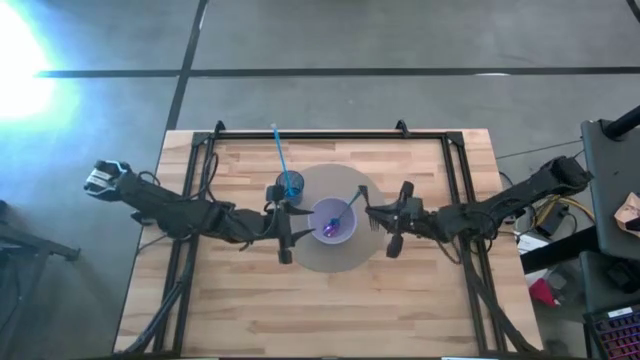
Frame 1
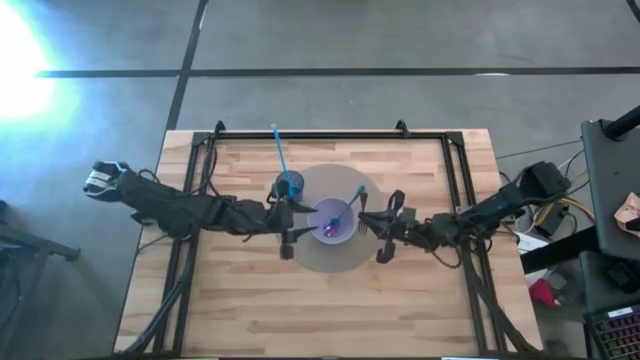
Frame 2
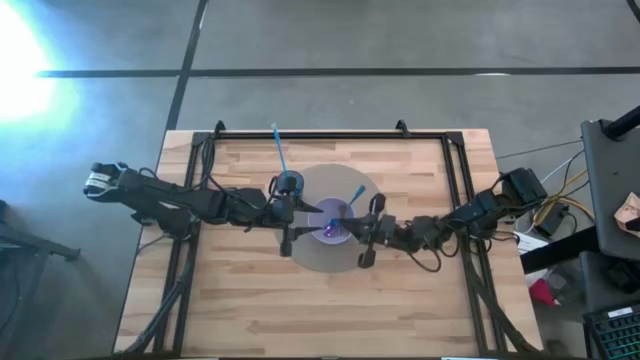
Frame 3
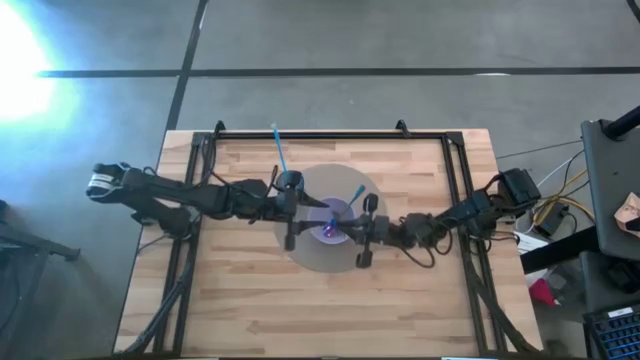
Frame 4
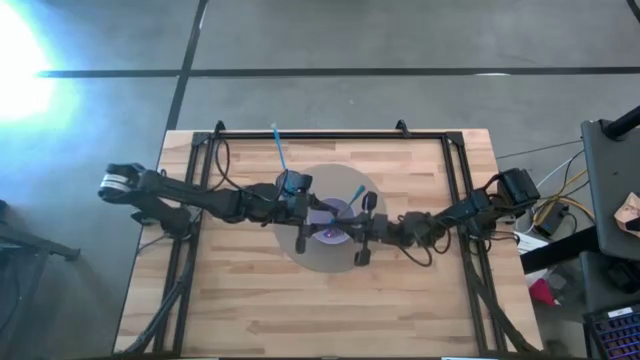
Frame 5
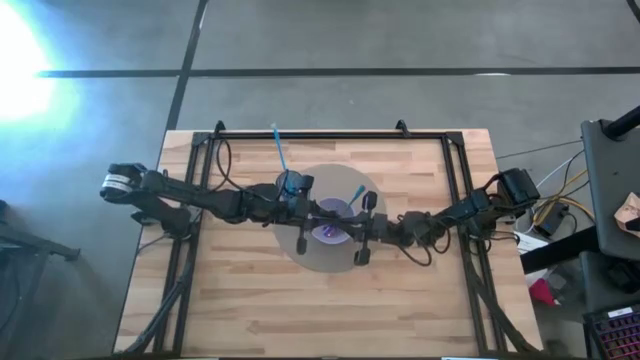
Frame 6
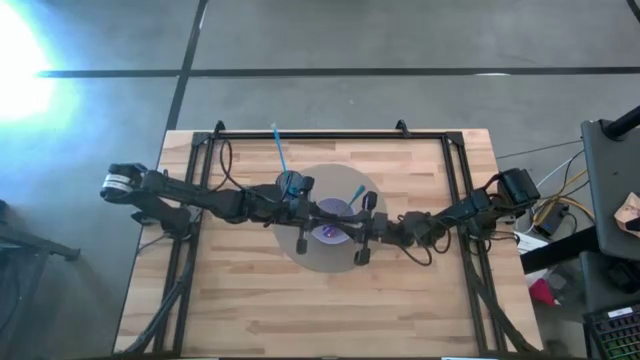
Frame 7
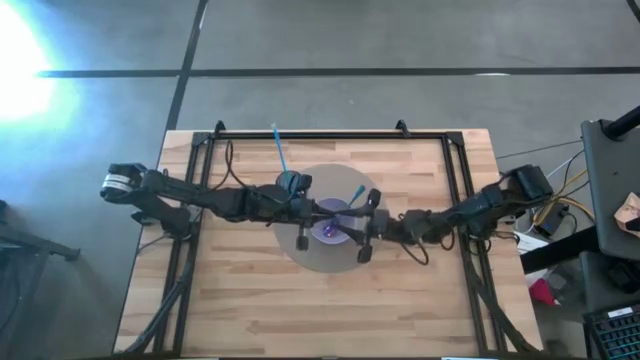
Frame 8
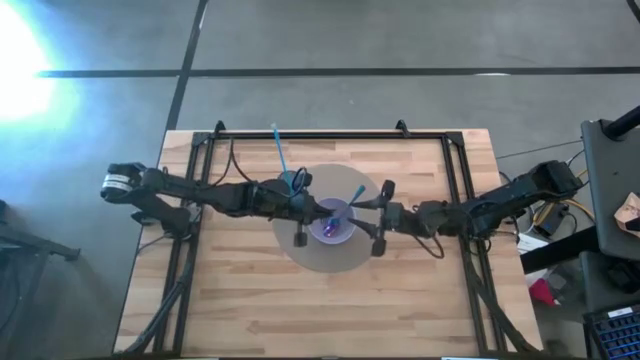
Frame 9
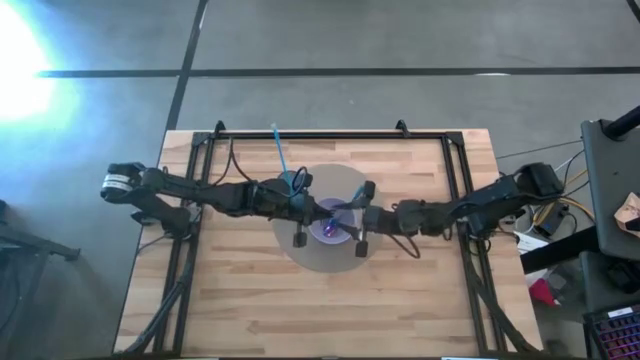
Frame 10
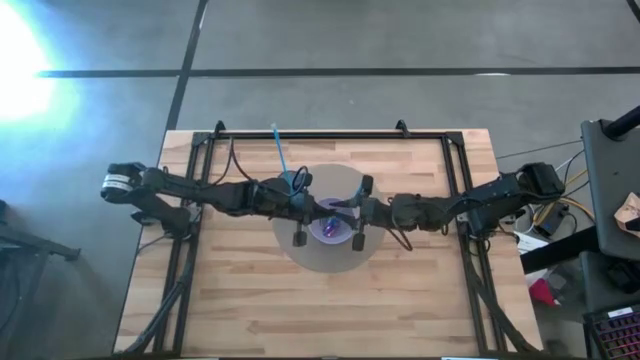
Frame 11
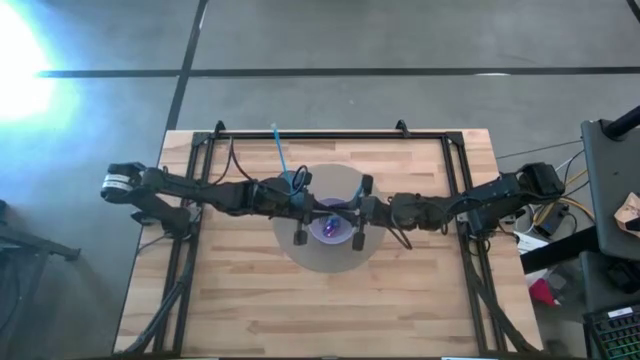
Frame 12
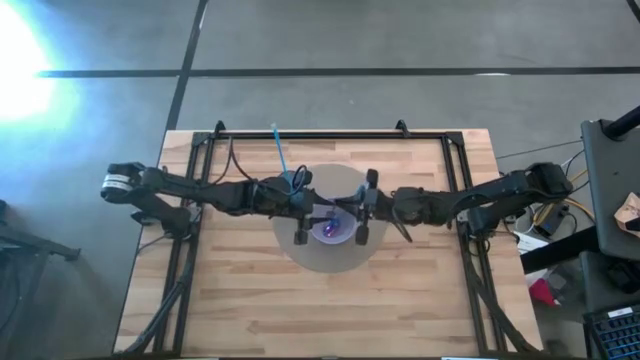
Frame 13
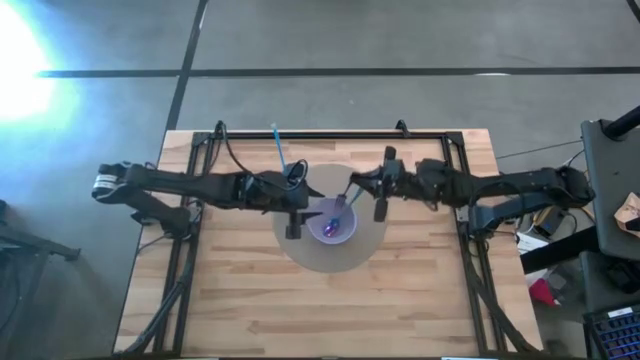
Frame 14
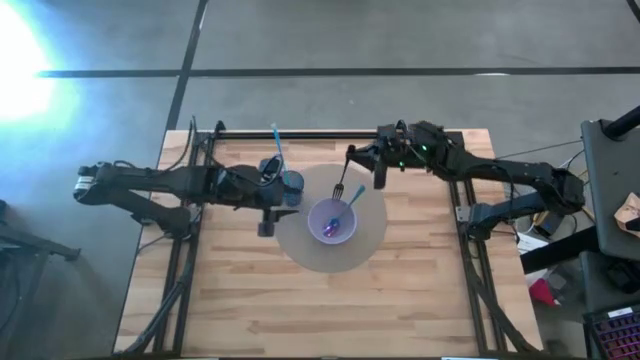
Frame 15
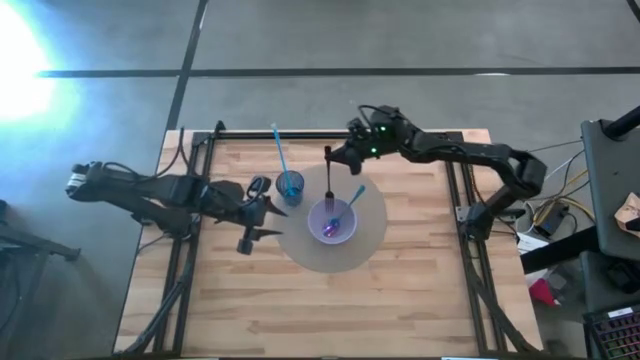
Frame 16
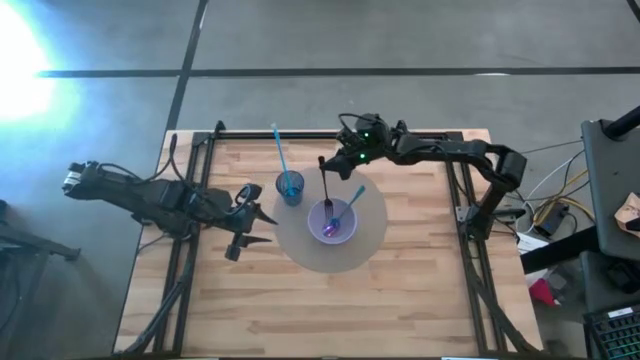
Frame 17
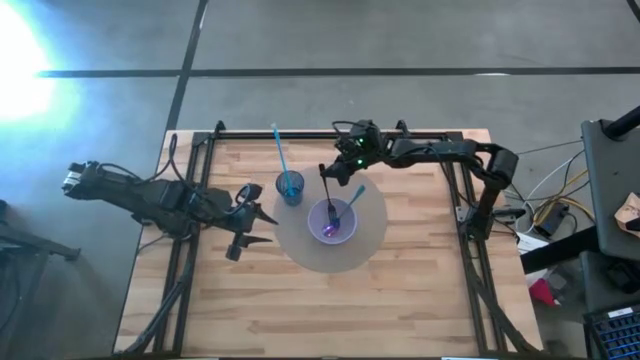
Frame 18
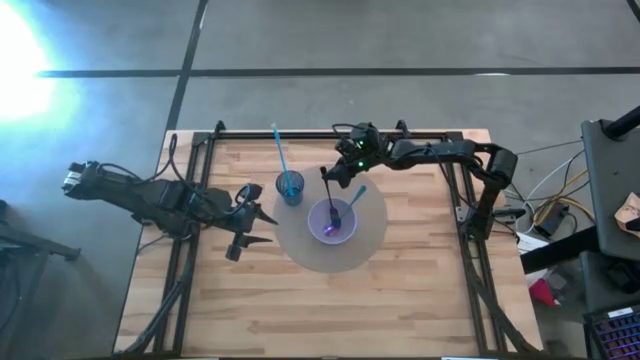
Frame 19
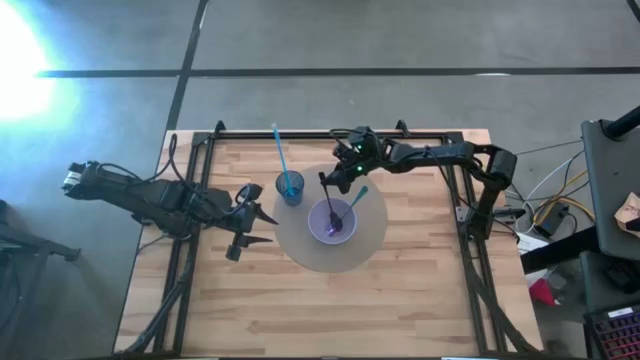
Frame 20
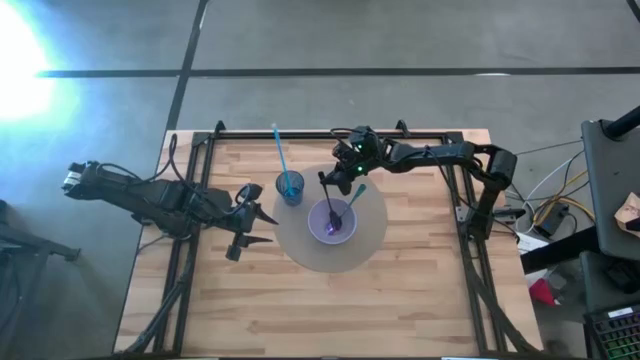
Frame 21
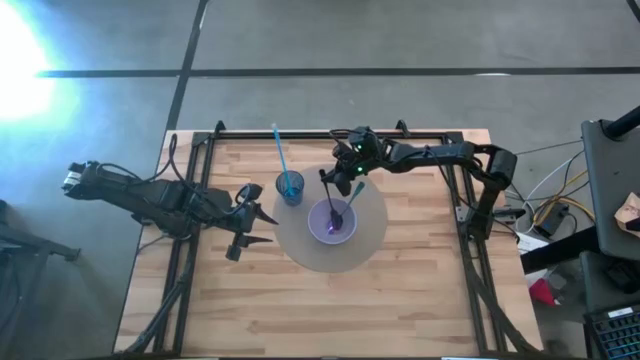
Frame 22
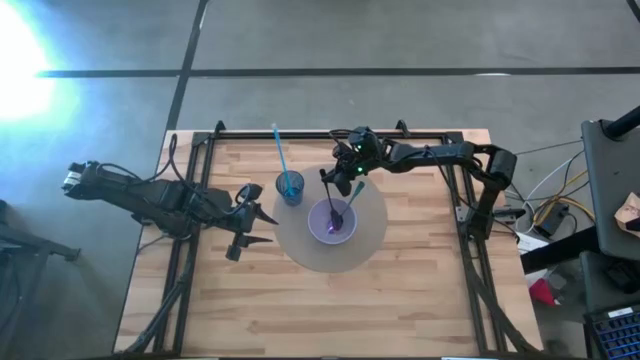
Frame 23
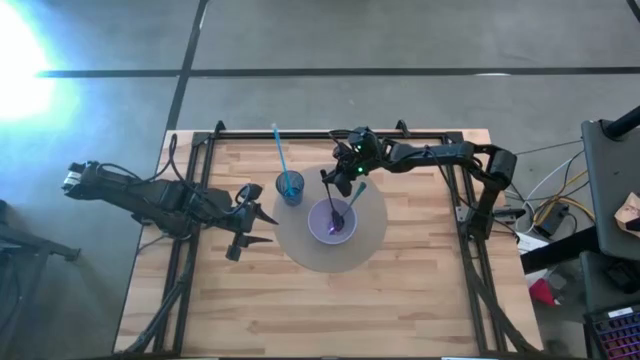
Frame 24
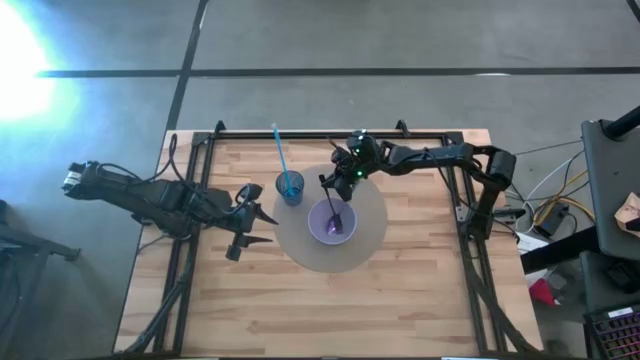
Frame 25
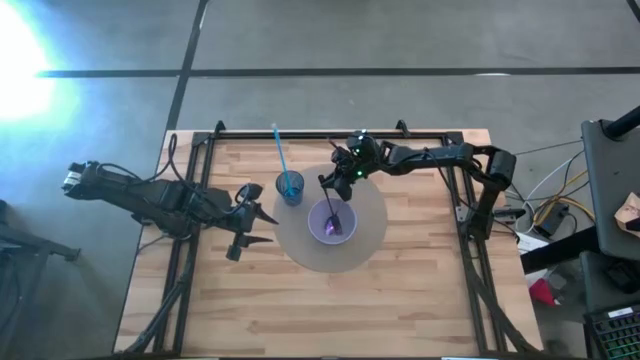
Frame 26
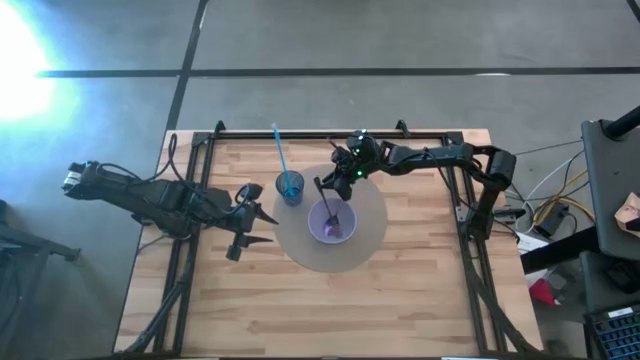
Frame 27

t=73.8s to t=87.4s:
Task: Pick & Place Utensil
Put the black fork into the purple bowl

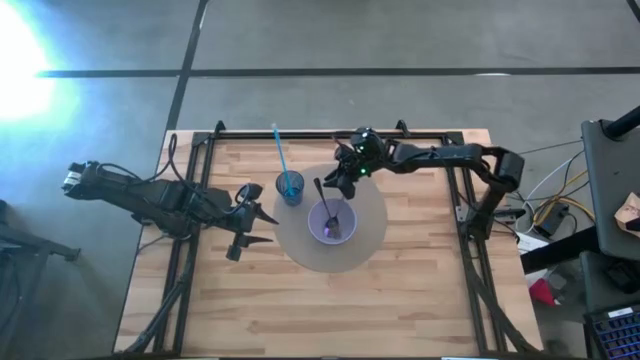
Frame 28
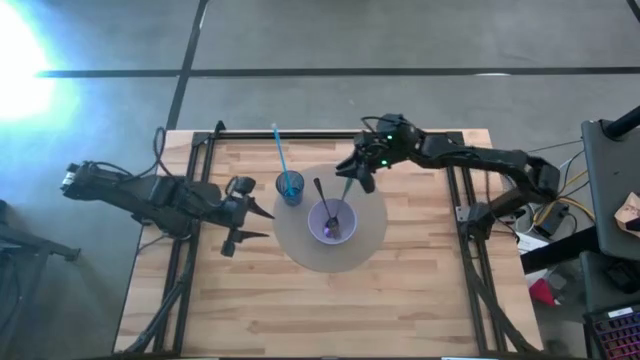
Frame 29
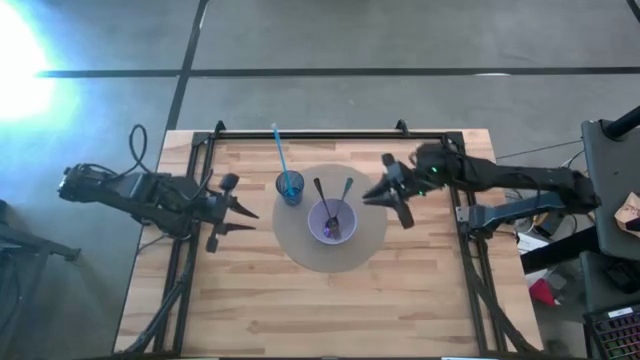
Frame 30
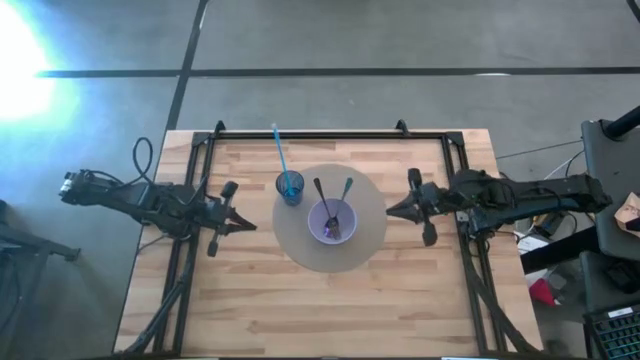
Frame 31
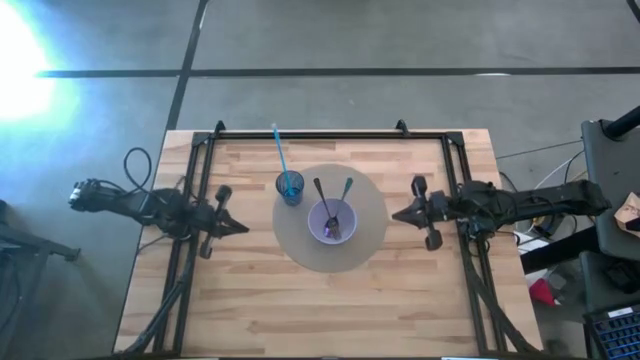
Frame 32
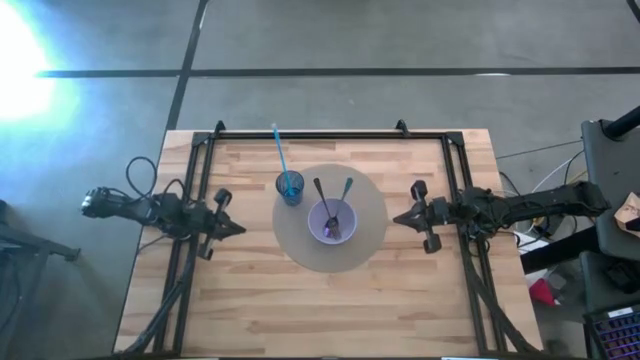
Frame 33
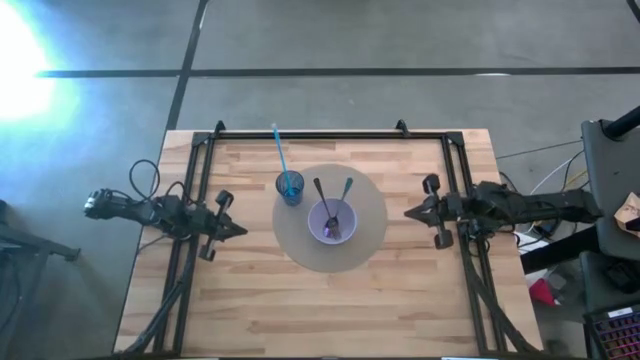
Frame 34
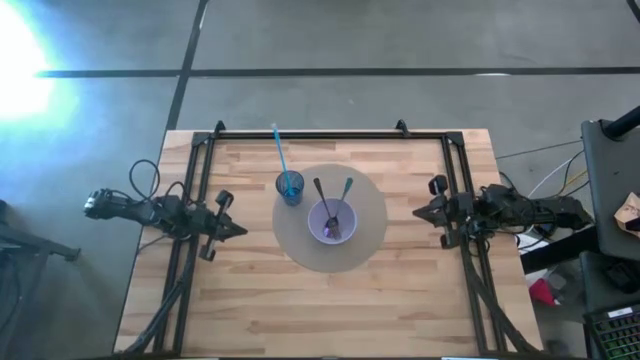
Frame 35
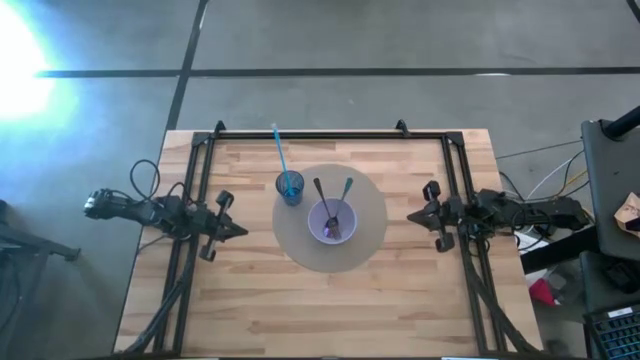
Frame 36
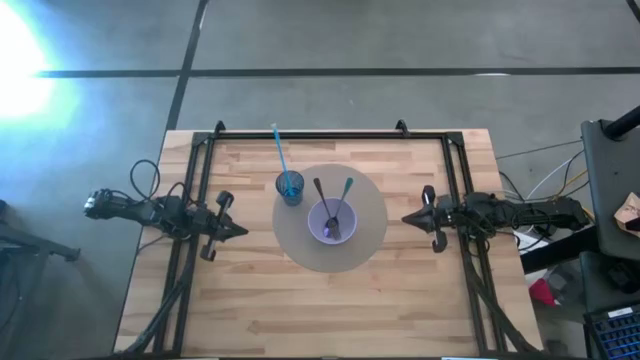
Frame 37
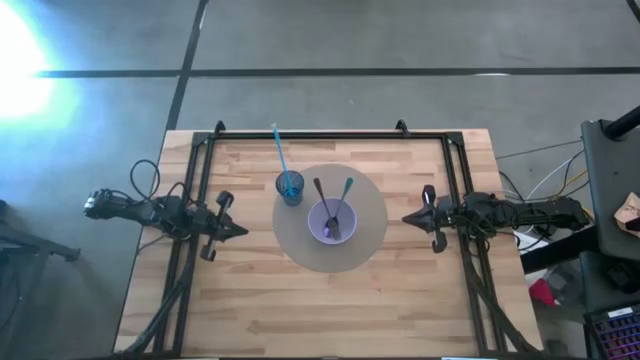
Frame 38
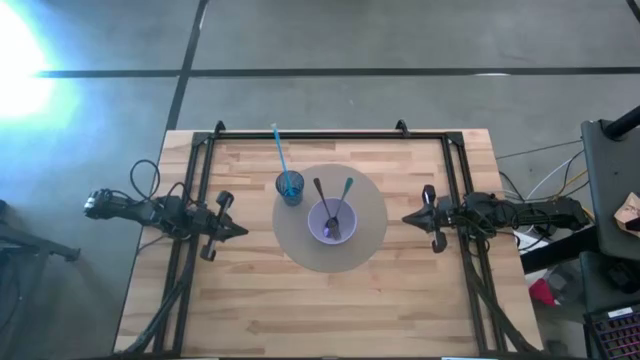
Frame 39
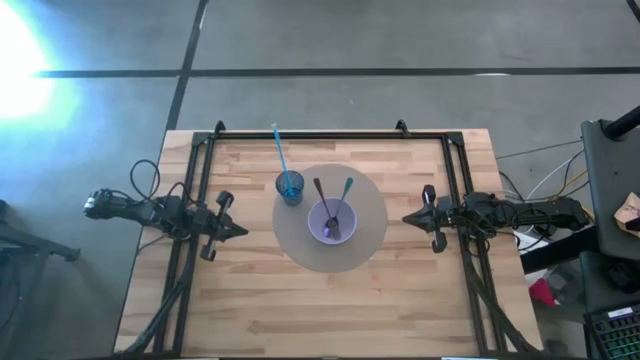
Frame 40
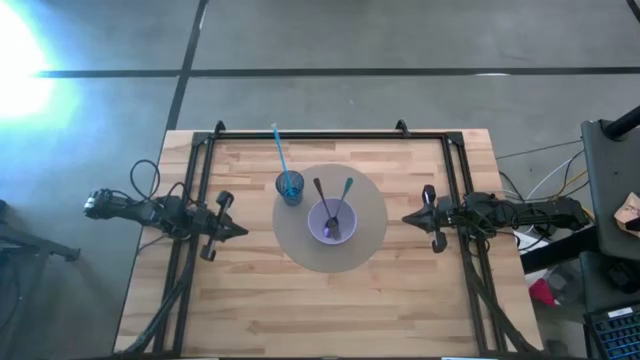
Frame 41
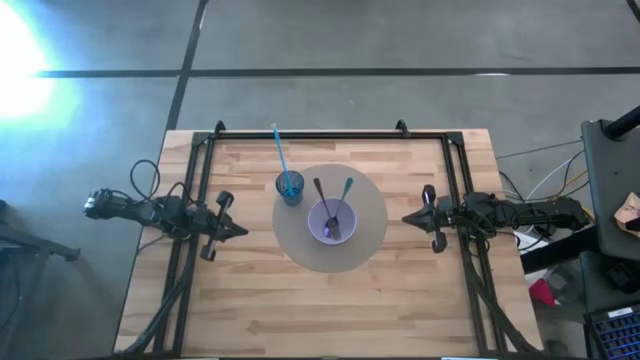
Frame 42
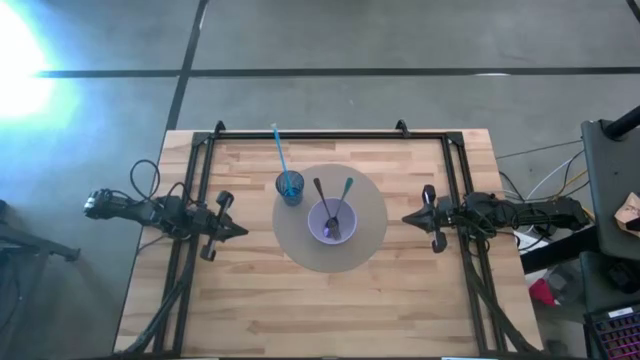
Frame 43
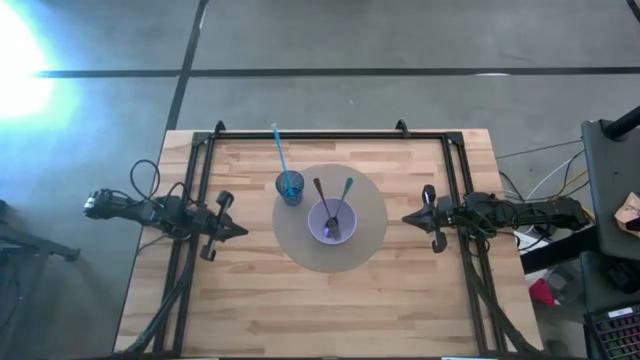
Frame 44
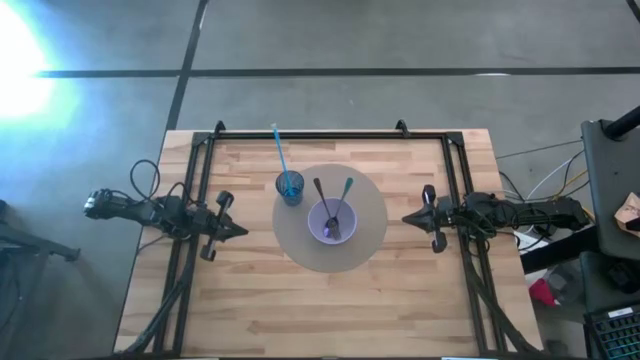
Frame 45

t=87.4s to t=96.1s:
Return to Home Position
